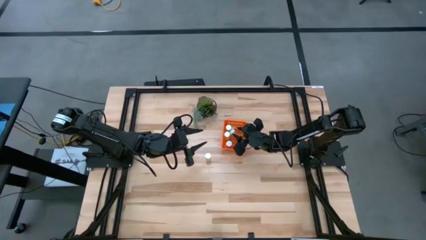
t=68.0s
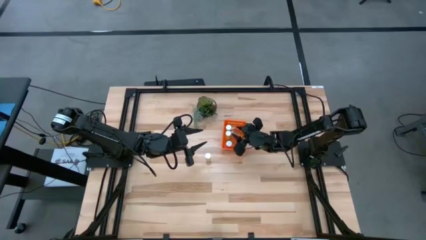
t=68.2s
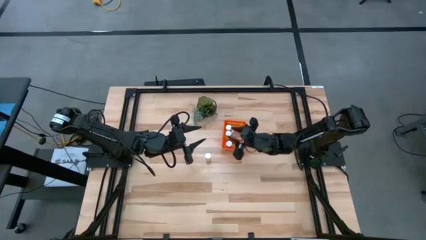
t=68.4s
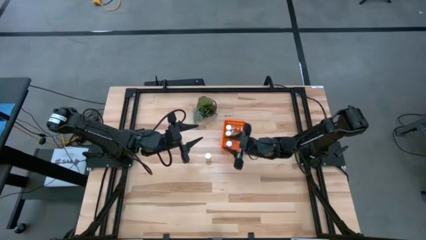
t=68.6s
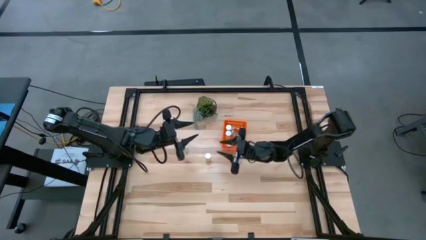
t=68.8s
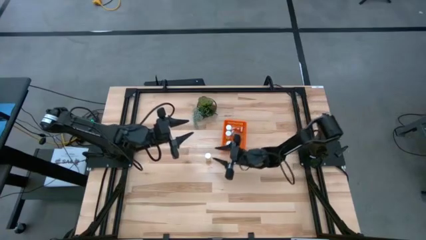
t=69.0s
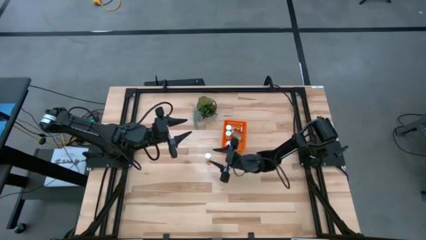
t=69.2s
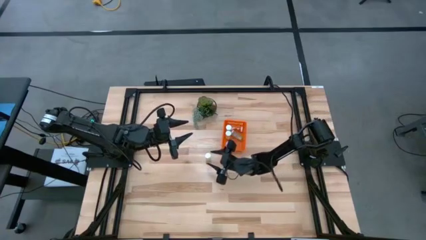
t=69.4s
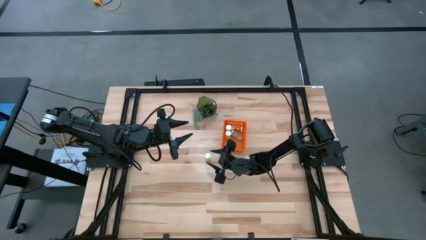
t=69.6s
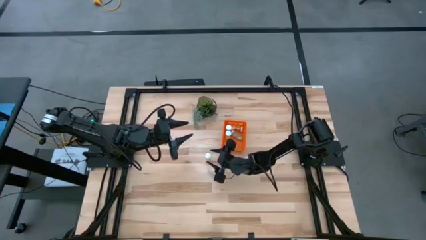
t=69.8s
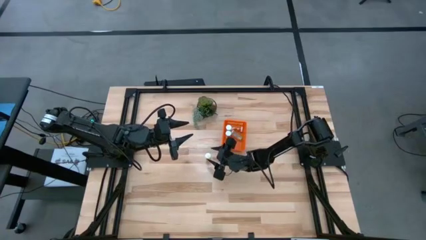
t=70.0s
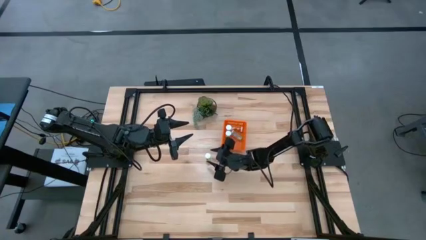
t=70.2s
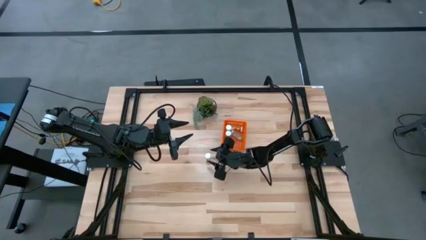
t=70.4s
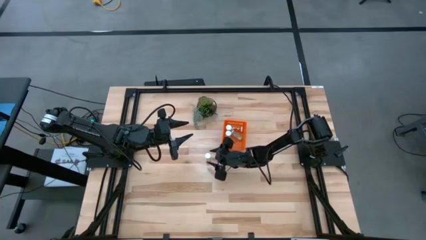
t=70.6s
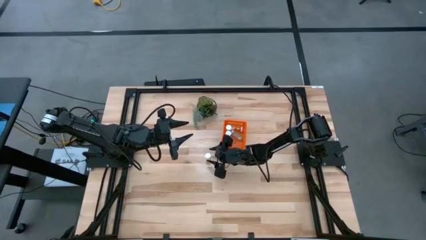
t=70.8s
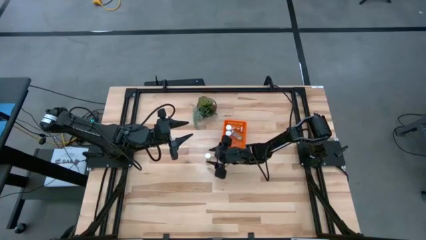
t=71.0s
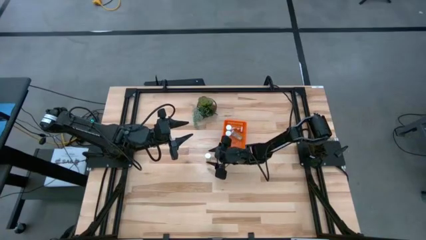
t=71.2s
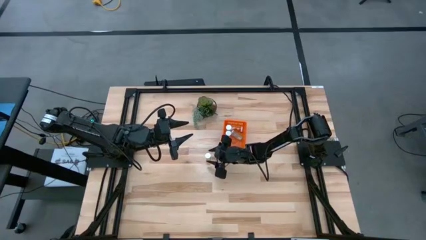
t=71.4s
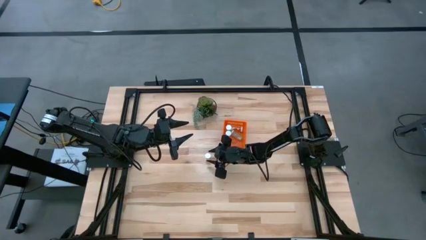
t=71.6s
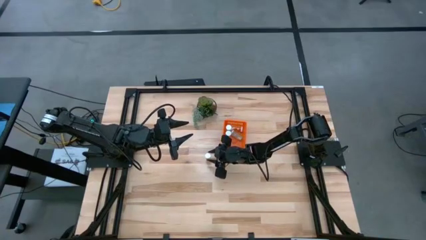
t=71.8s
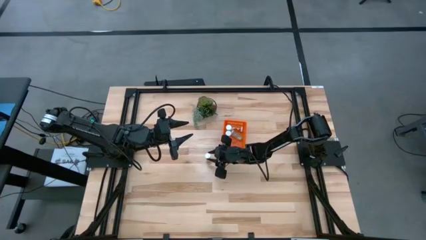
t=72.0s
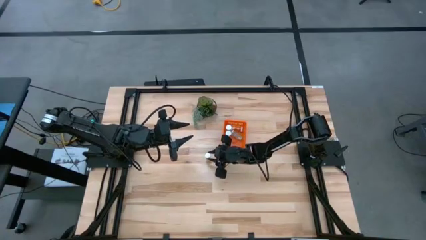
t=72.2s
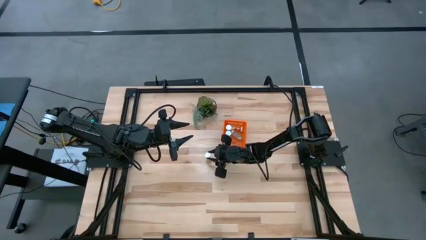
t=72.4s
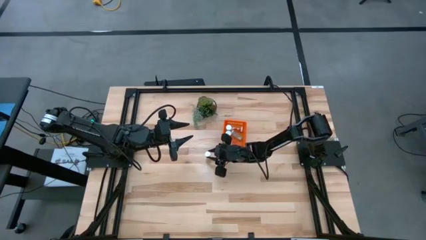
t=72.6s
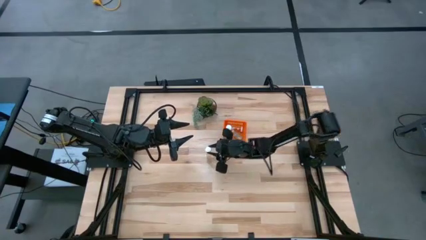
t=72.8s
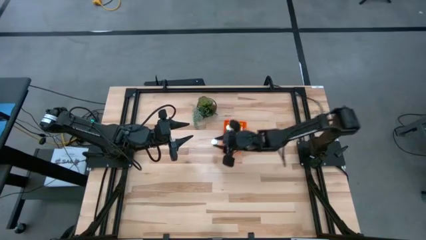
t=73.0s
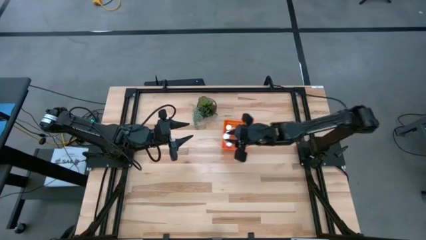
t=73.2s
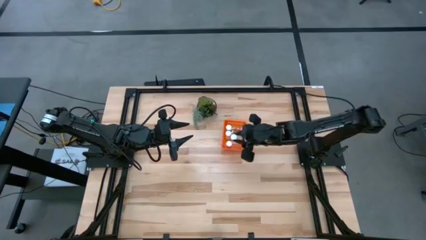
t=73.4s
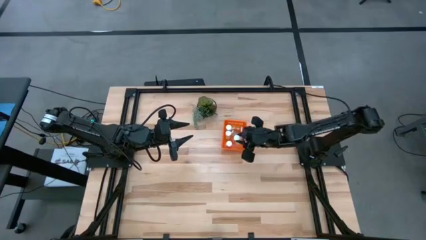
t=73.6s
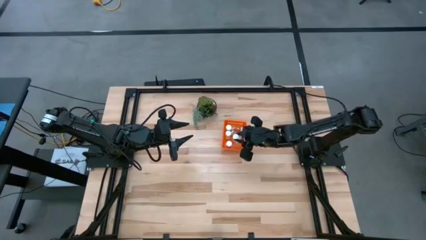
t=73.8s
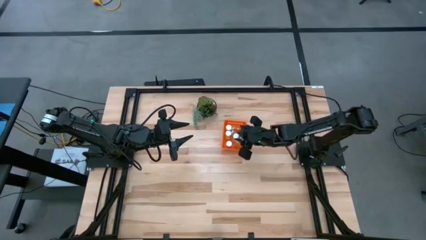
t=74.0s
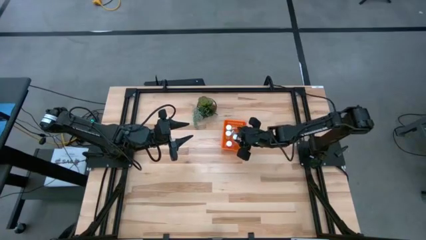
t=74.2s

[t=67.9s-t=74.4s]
Task: Pick and place pill bottles into a basket
Put the yellow pill bottle into the basket

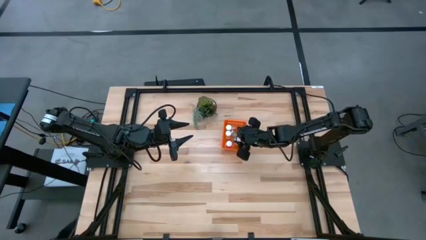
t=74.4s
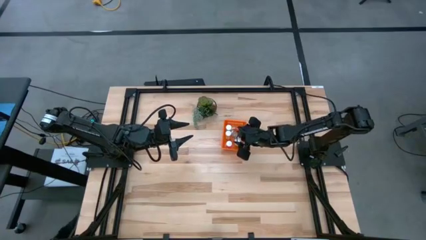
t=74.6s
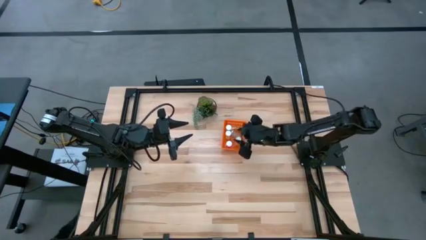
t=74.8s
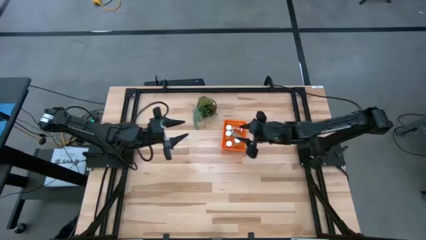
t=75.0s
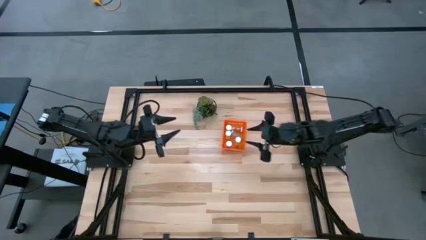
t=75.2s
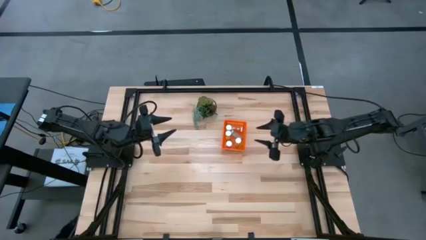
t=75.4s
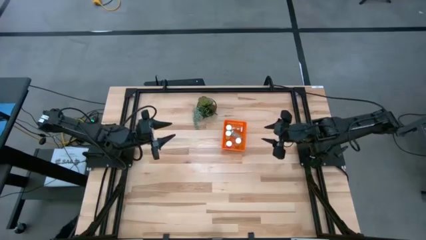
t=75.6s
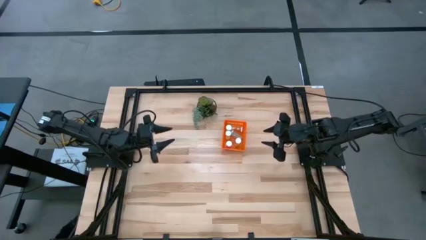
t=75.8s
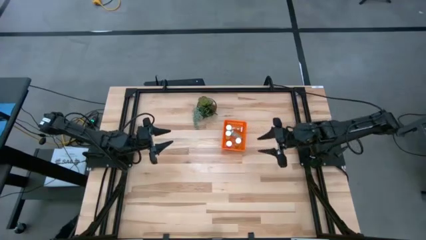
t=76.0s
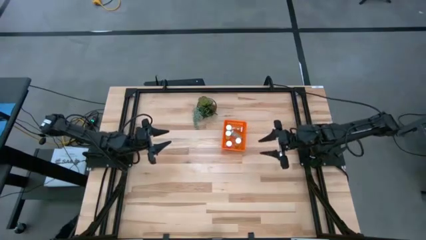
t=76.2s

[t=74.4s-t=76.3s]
Return to Home Position

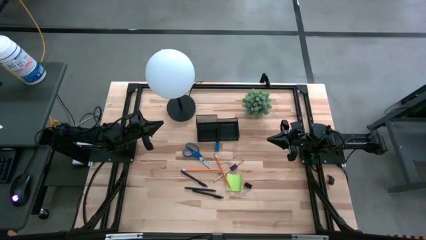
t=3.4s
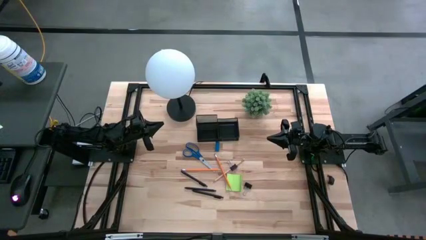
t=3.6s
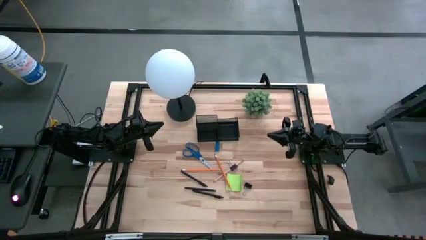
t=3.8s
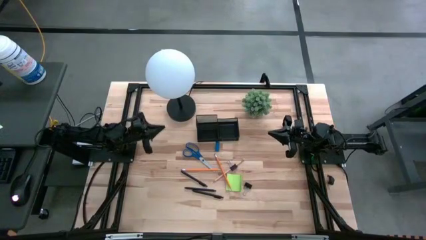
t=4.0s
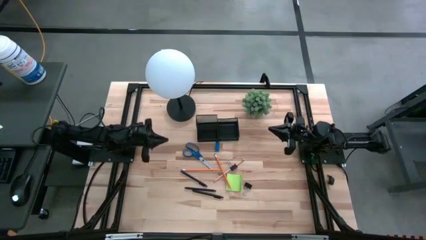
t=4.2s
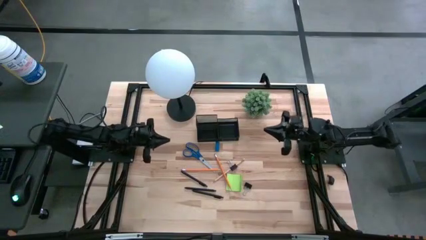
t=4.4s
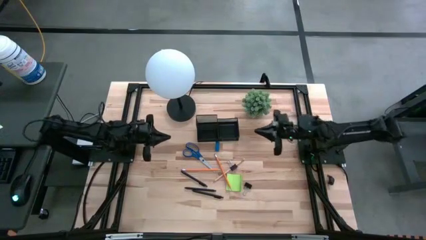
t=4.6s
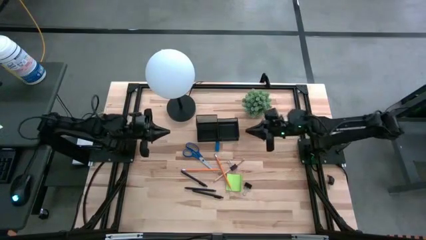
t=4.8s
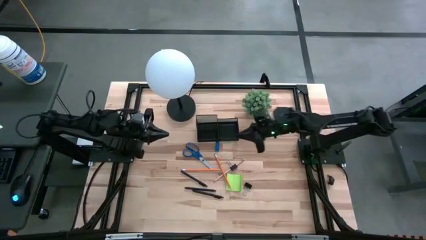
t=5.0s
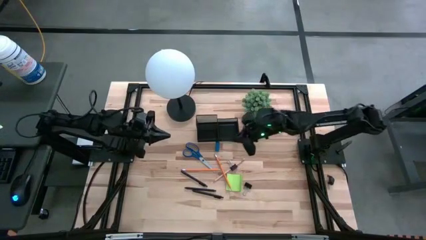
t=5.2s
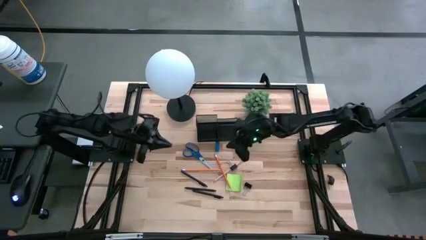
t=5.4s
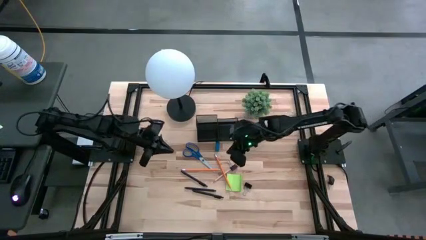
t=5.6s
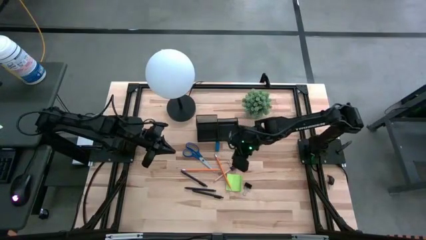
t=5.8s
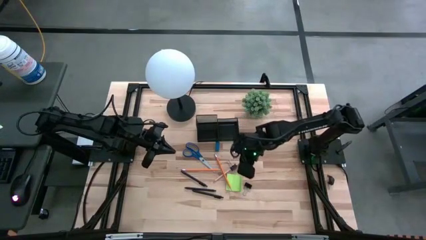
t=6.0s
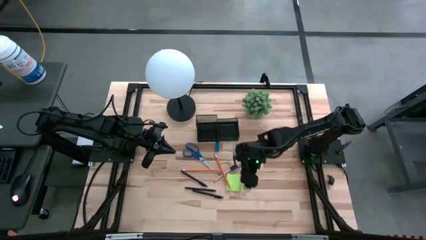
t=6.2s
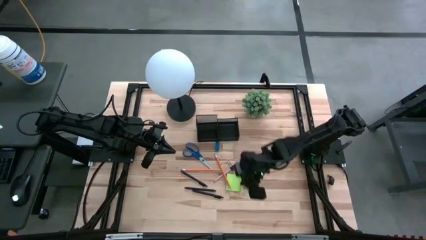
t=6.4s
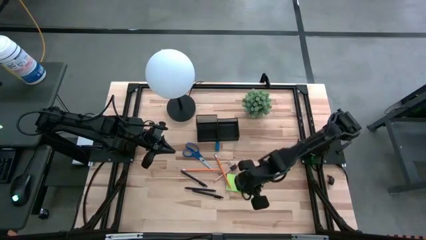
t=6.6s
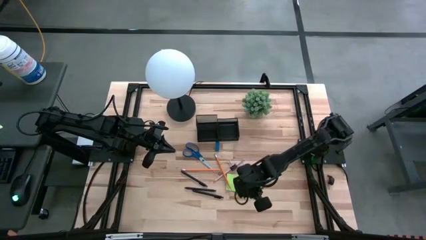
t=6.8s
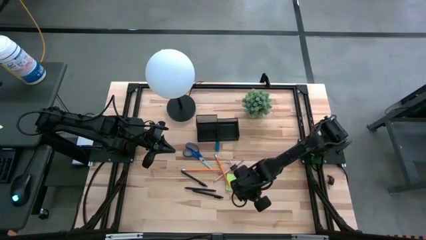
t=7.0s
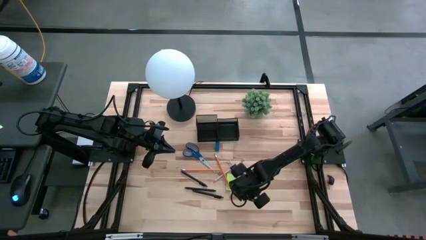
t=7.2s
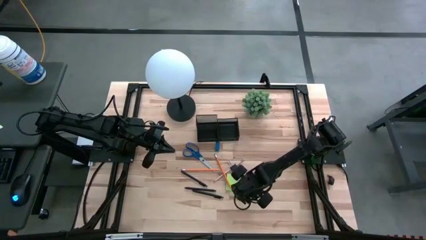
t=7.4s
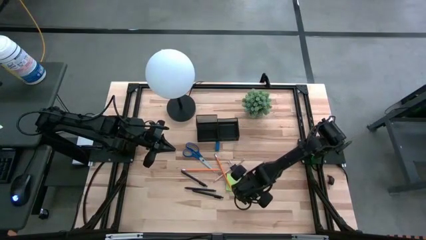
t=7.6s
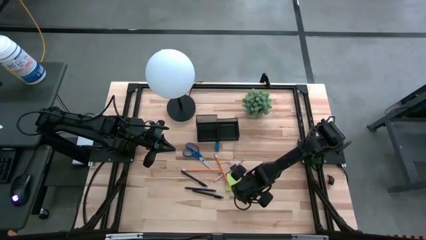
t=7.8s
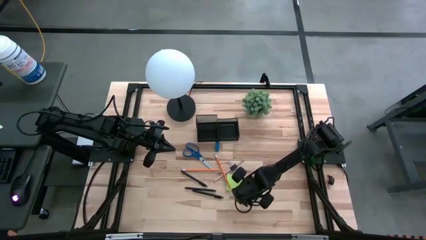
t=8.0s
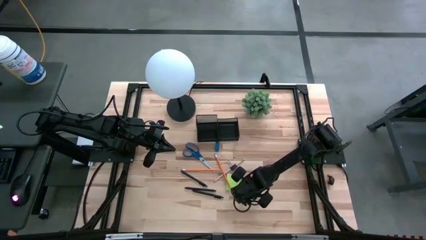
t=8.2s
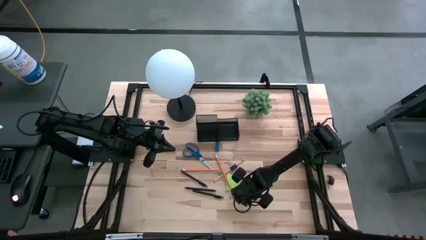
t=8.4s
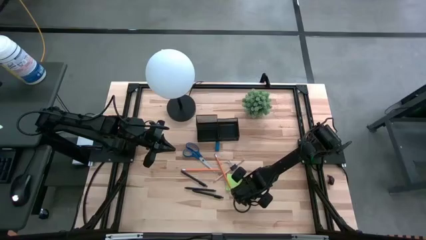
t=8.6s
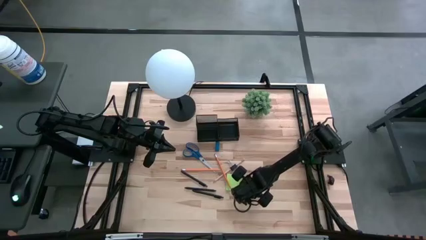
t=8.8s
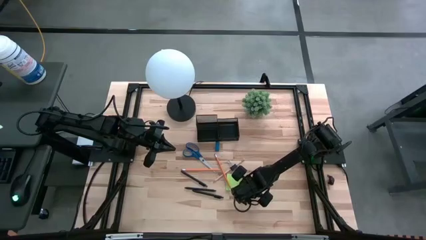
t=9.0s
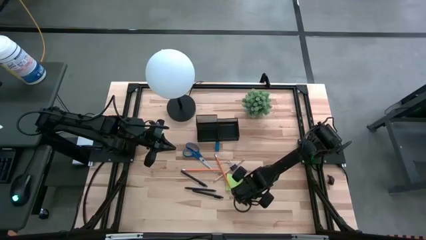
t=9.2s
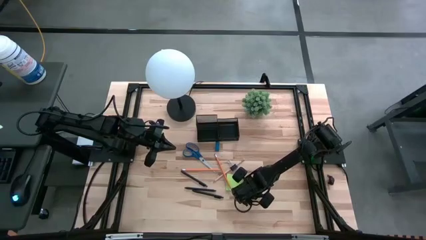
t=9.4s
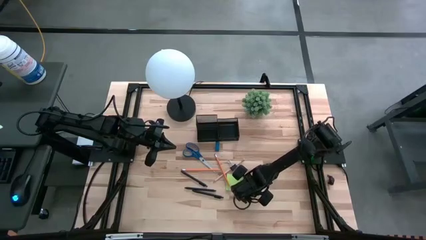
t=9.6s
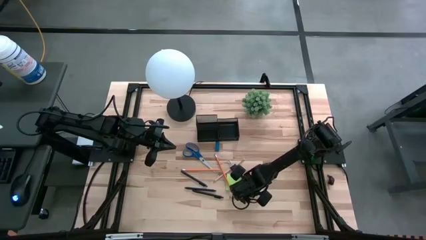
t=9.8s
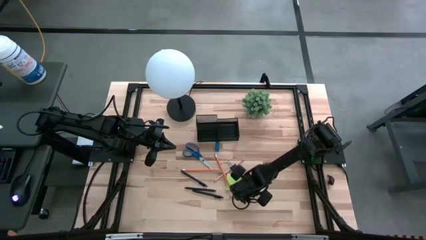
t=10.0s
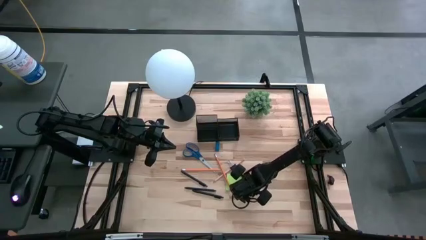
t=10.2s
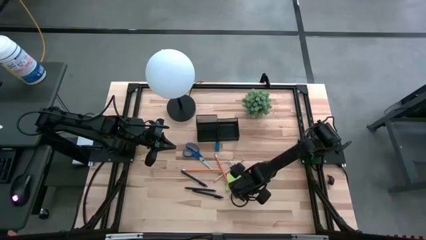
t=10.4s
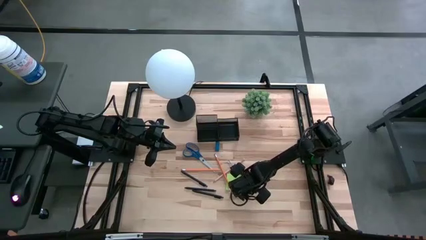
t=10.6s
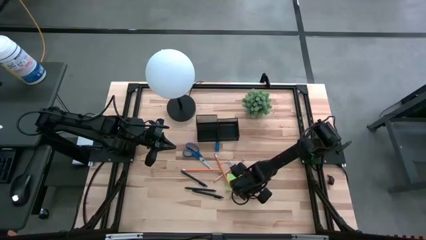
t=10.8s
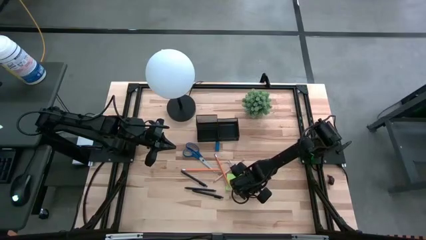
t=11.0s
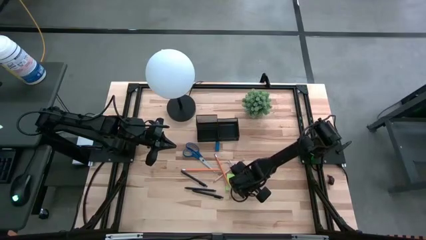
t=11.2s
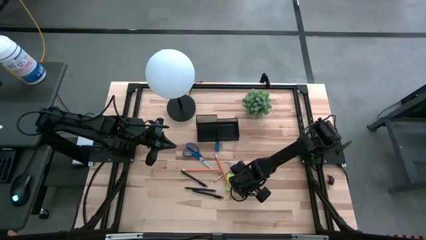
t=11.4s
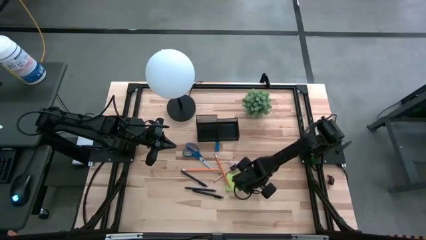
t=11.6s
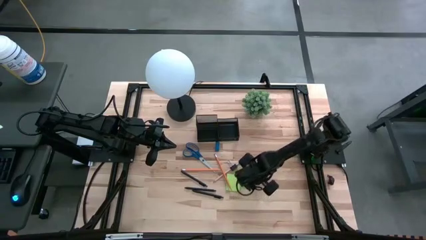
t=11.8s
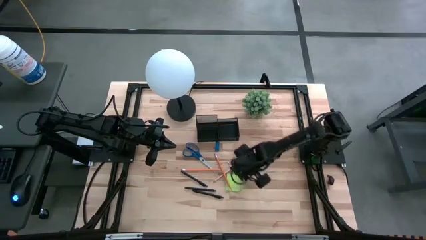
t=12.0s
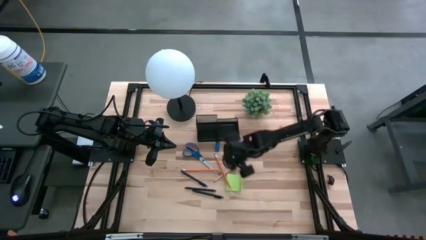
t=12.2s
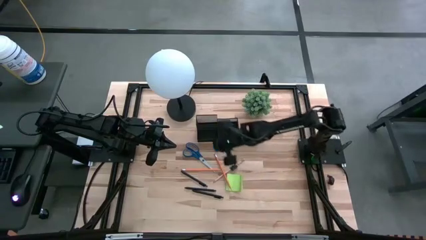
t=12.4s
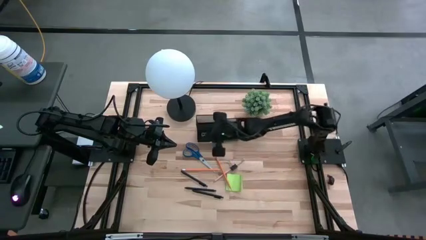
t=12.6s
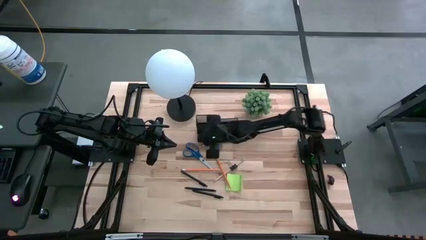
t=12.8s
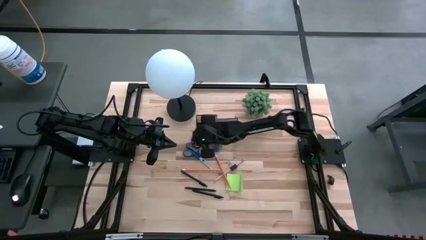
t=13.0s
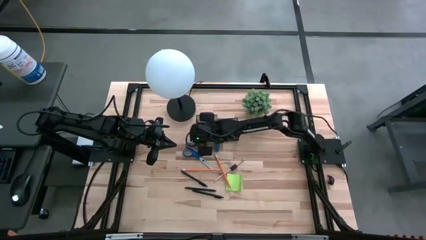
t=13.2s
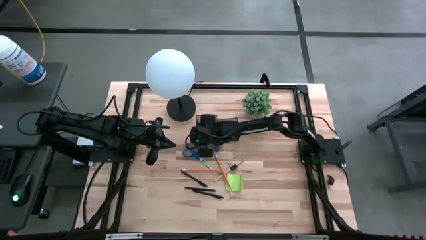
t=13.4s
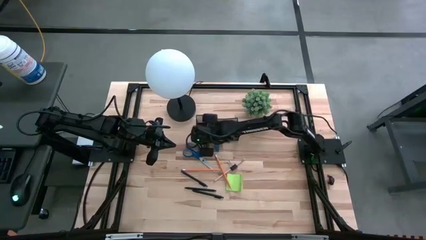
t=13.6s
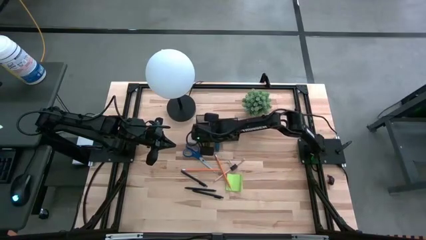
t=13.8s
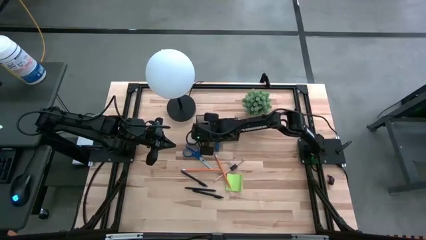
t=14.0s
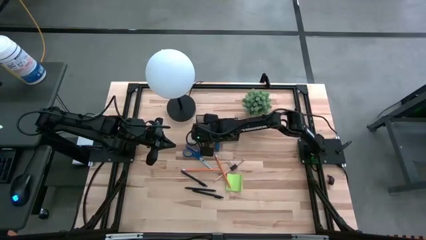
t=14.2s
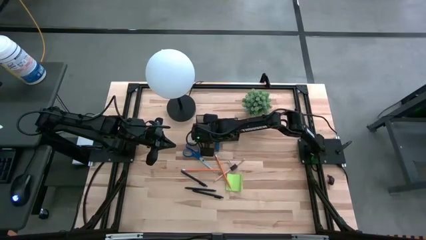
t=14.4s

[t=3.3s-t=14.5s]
Task: Pick and place office supplies into organizer
Put the bottom black binder clip into the desk organizer
